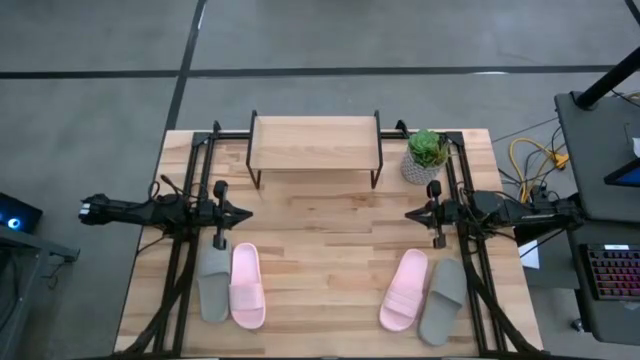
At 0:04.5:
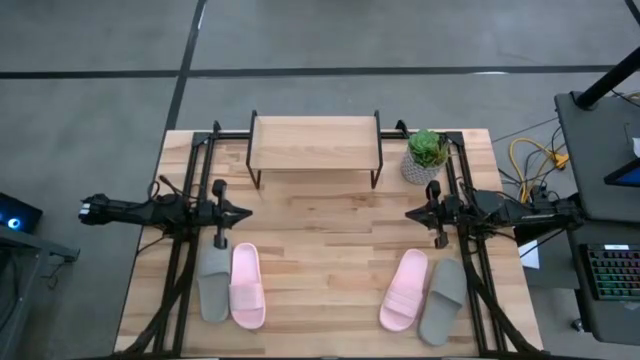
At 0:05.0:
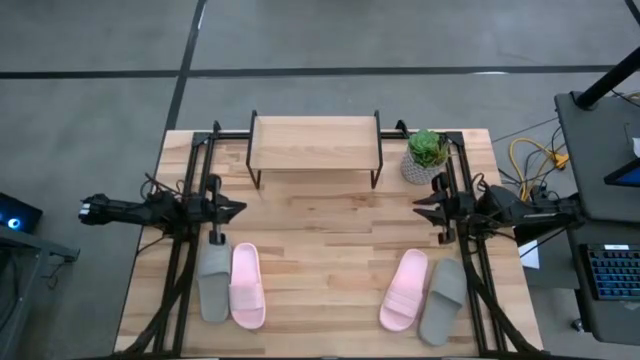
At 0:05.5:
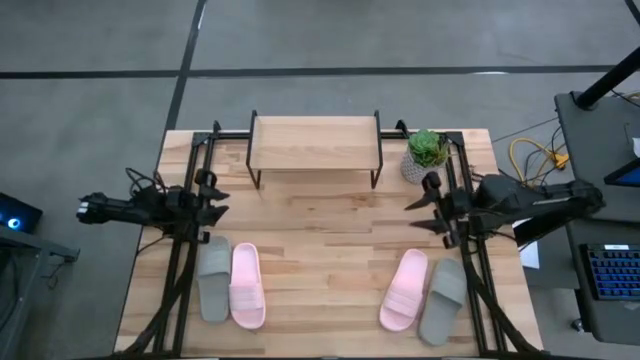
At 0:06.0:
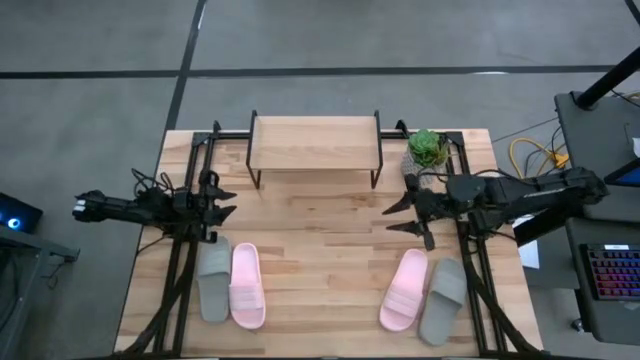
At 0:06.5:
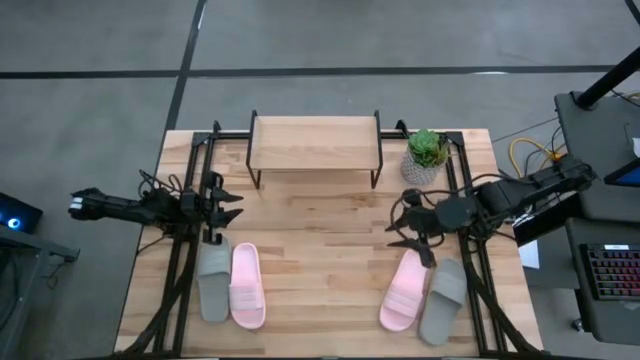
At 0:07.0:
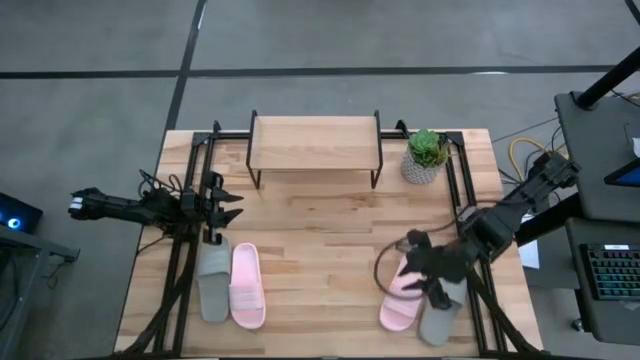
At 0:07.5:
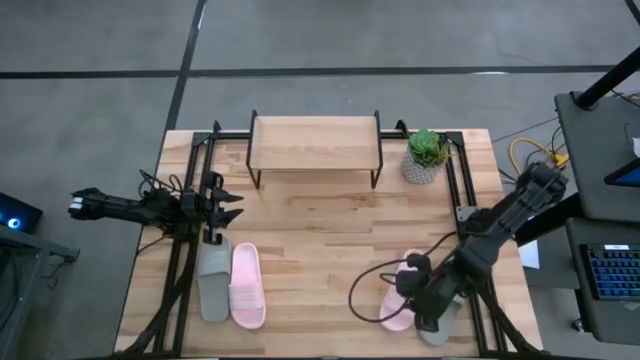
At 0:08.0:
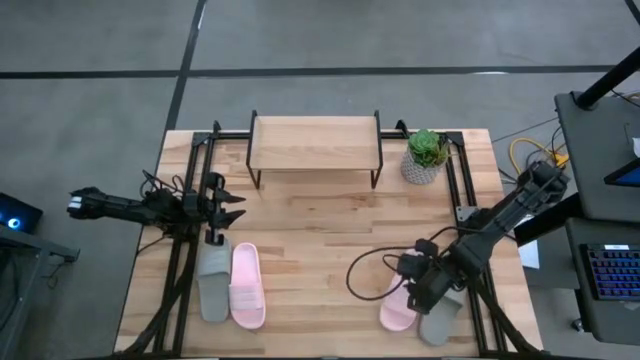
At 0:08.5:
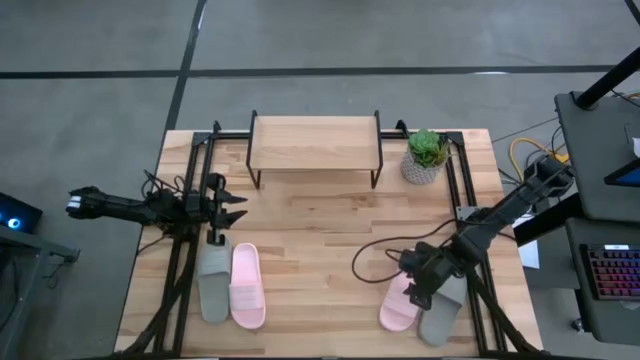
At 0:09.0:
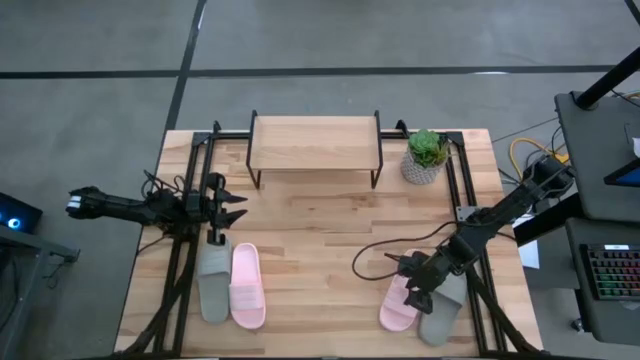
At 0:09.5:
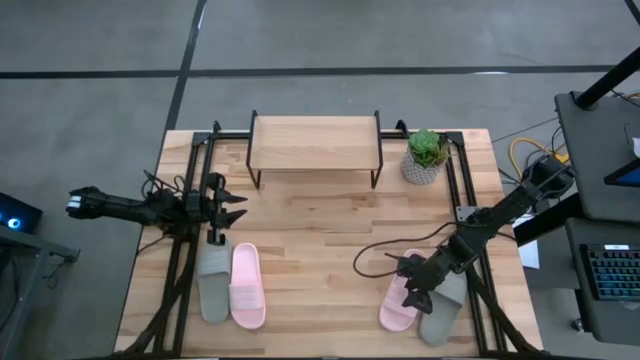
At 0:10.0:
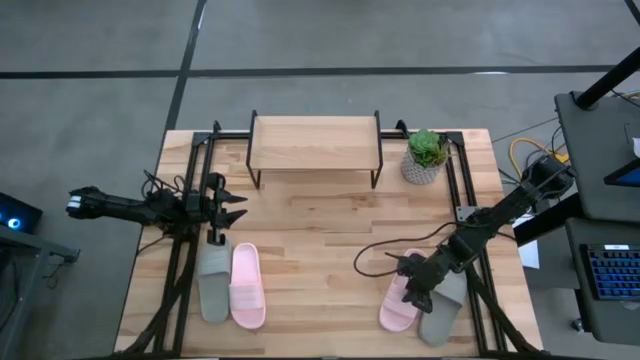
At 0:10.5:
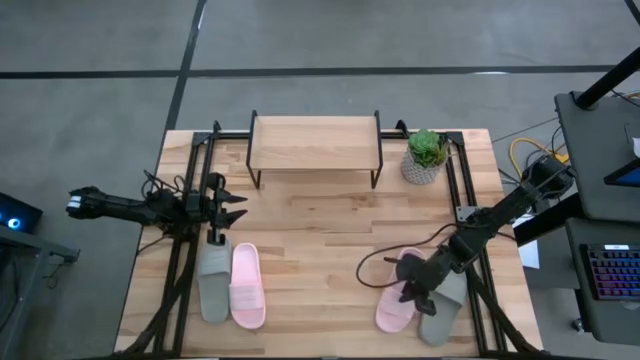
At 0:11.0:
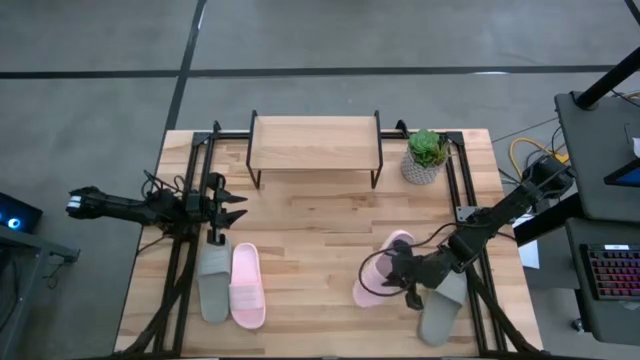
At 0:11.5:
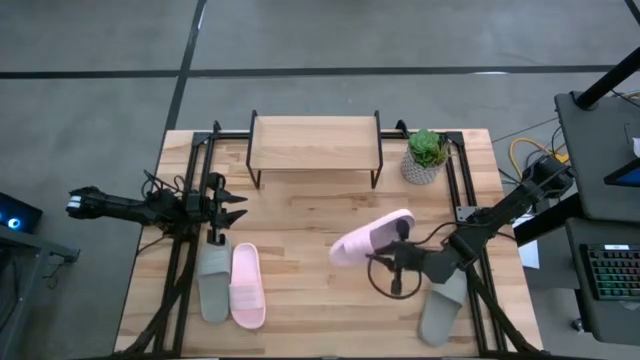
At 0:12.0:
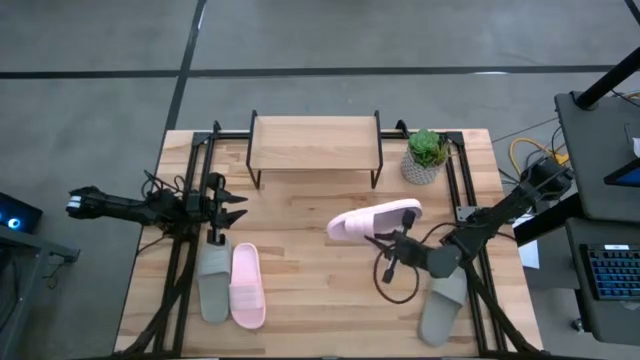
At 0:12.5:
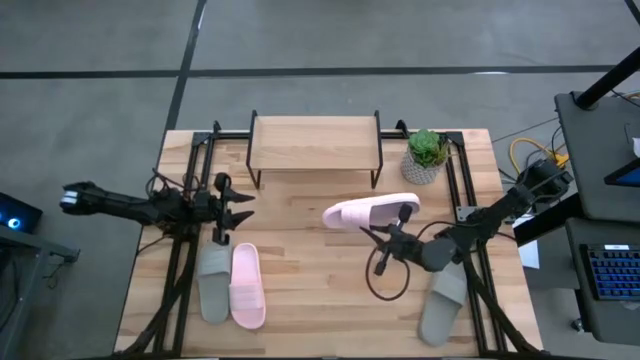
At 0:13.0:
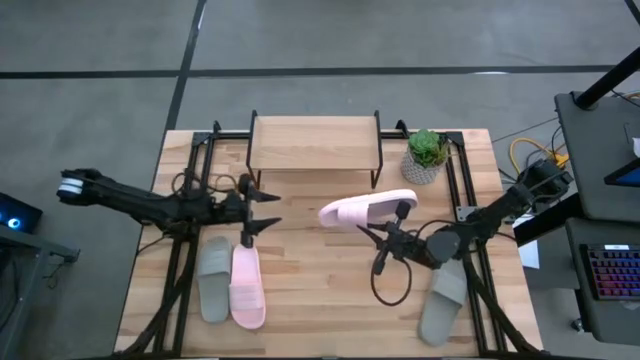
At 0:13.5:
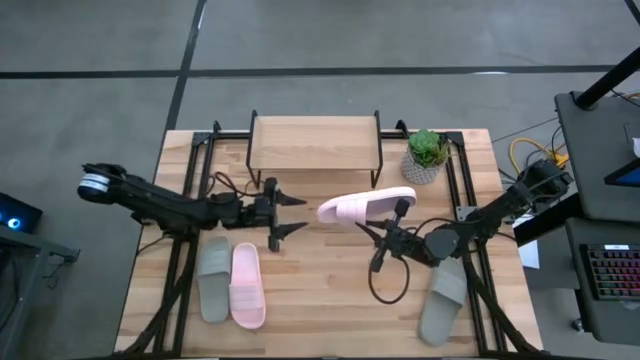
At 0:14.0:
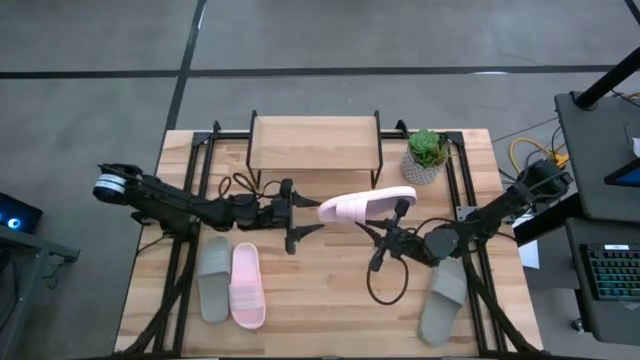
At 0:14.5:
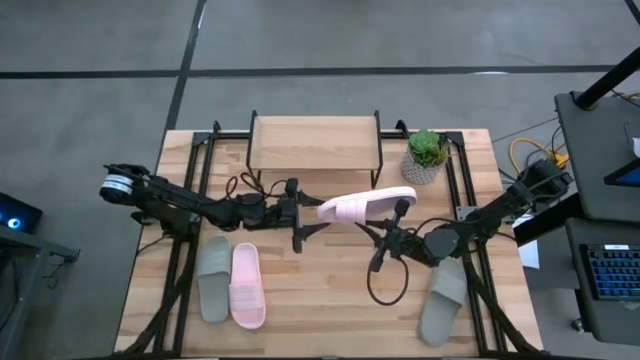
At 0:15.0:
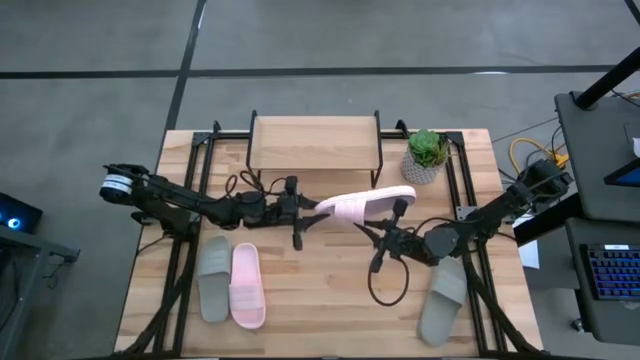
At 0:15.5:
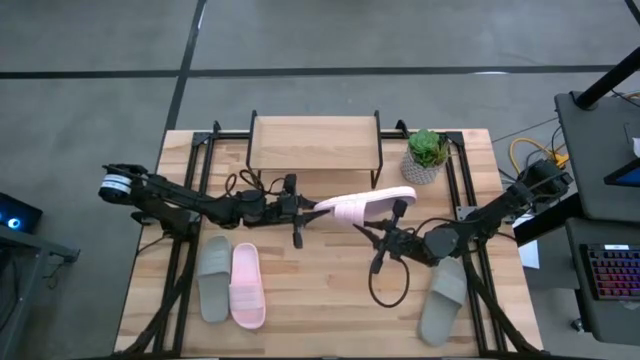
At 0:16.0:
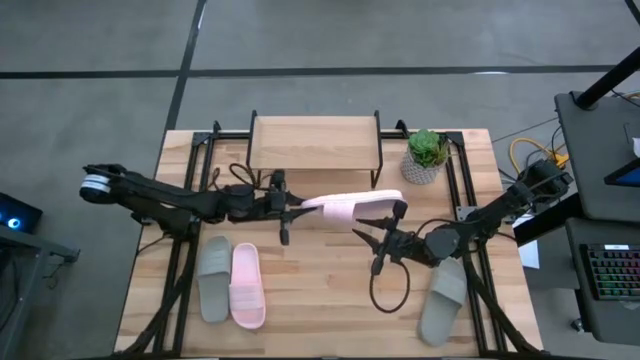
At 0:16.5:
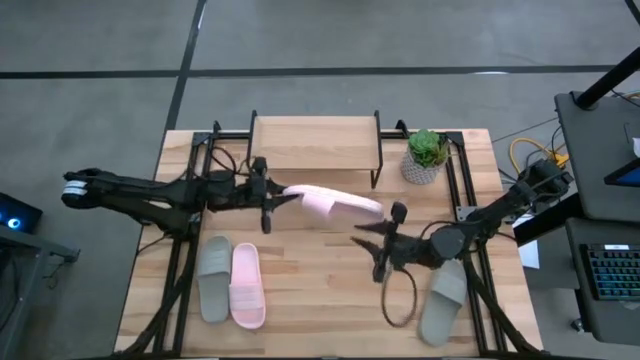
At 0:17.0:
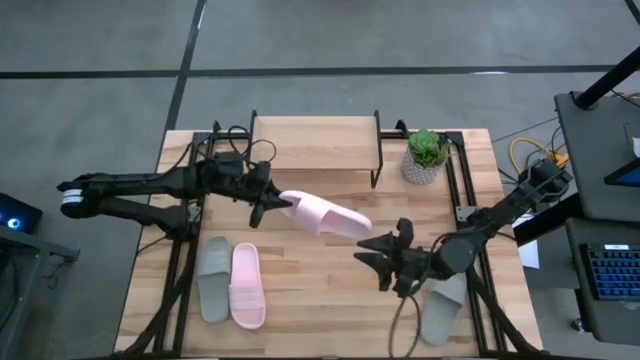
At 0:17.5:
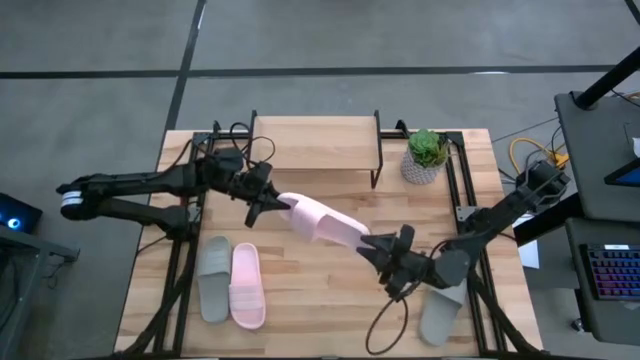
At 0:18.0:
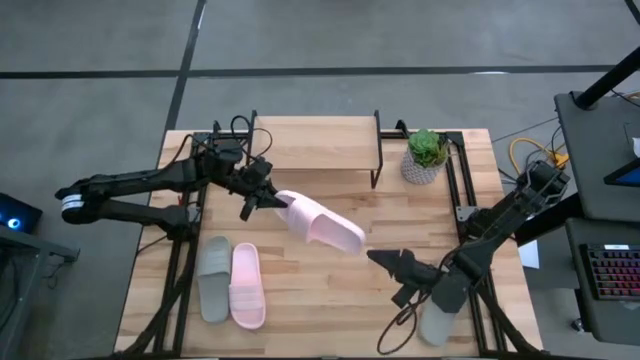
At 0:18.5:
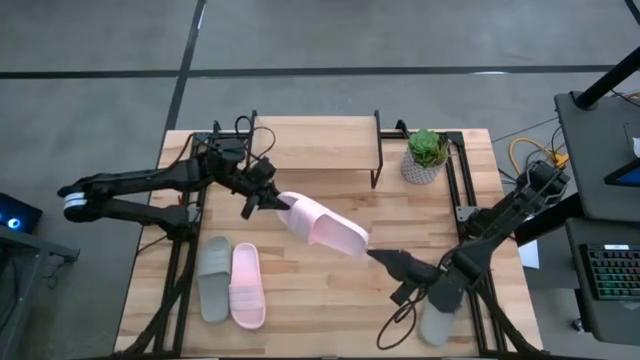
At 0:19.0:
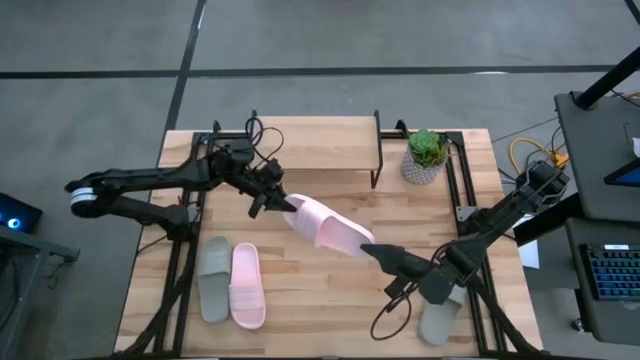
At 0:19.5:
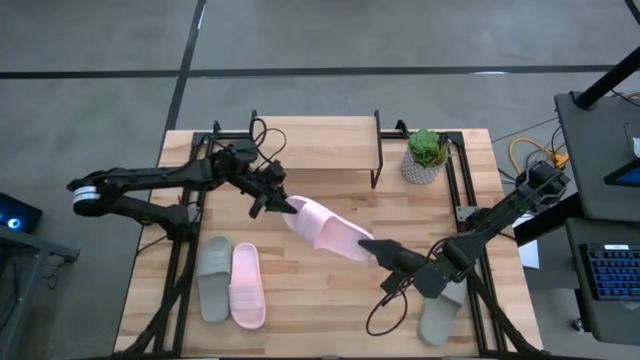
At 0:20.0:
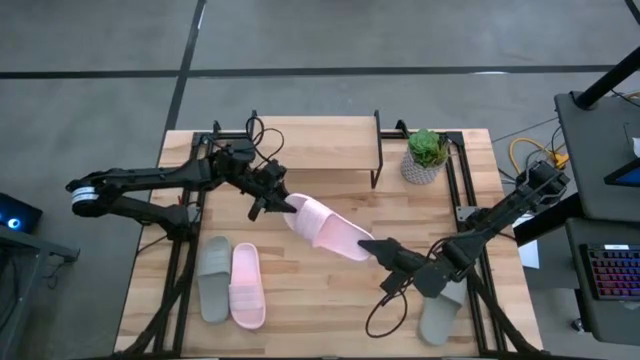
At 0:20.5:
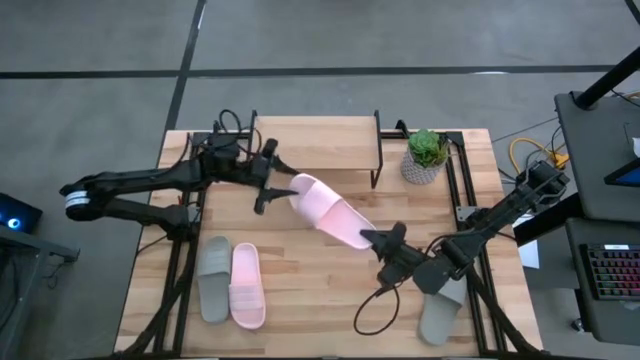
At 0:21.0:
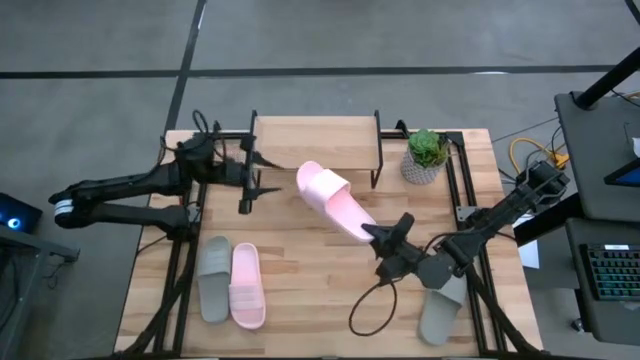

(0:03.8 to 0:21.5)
Task: Pick and place slides into the shelf
Put the right pink slipper on the shelf

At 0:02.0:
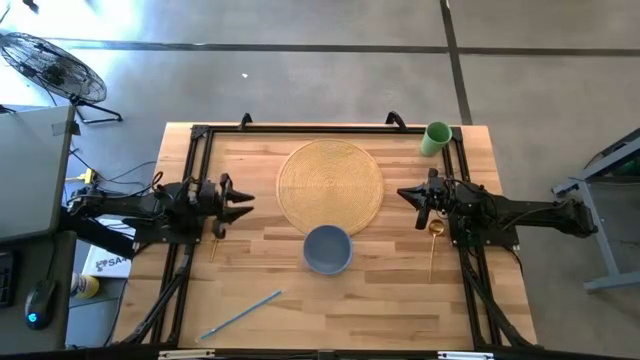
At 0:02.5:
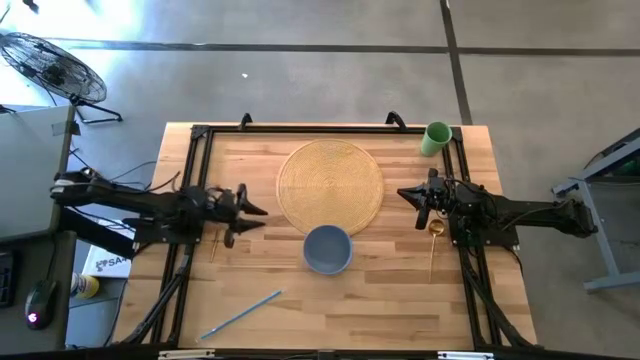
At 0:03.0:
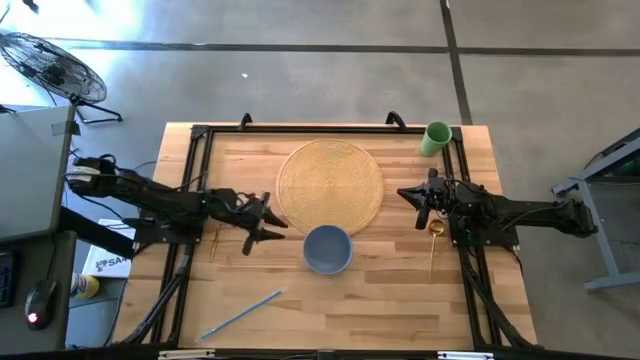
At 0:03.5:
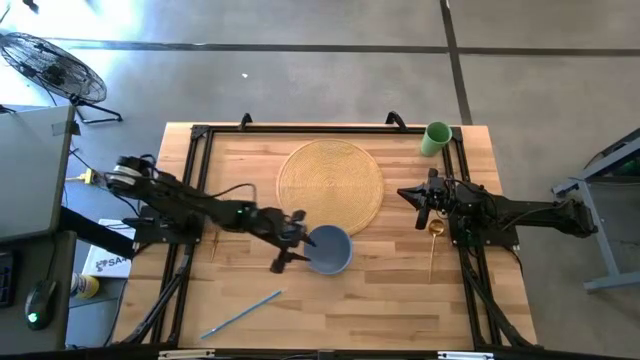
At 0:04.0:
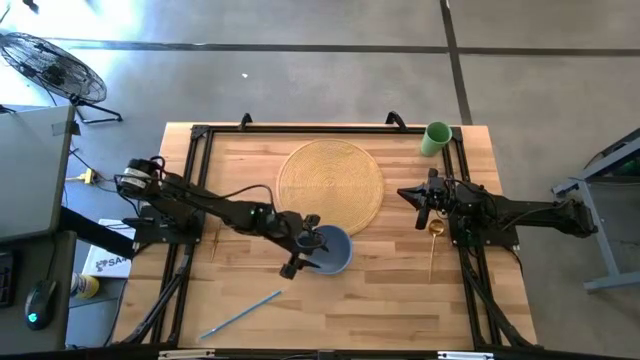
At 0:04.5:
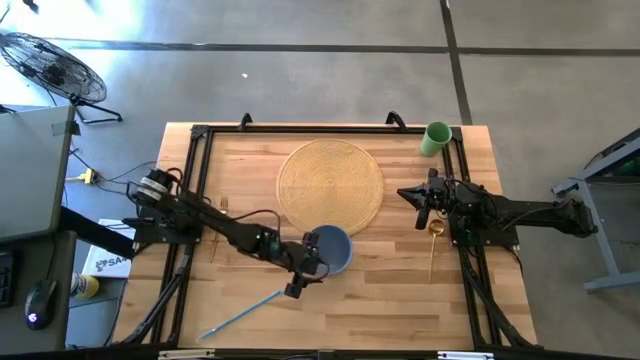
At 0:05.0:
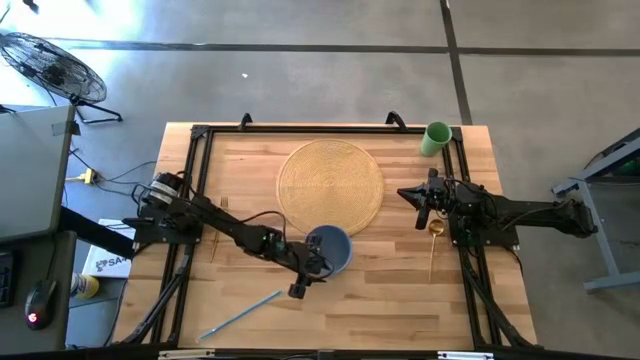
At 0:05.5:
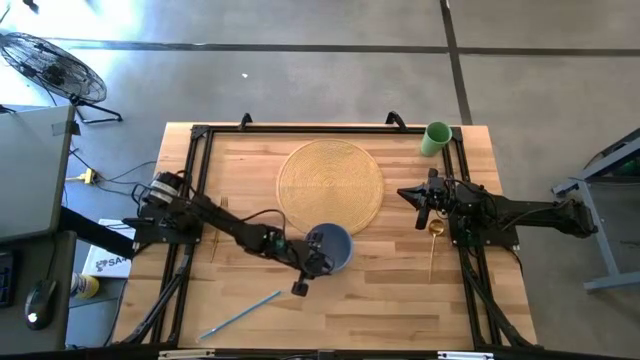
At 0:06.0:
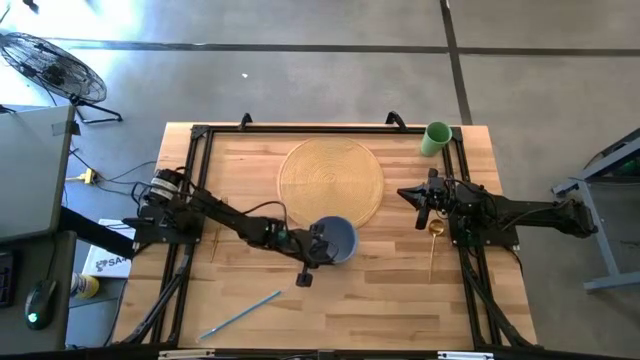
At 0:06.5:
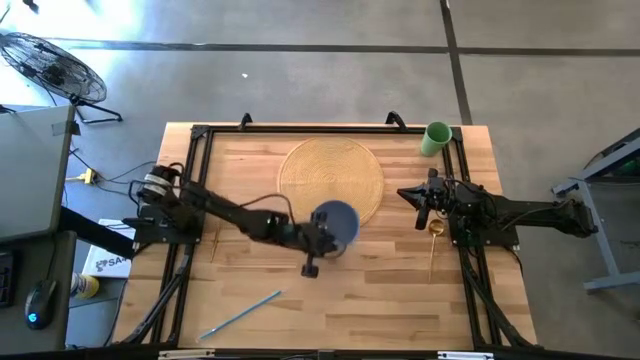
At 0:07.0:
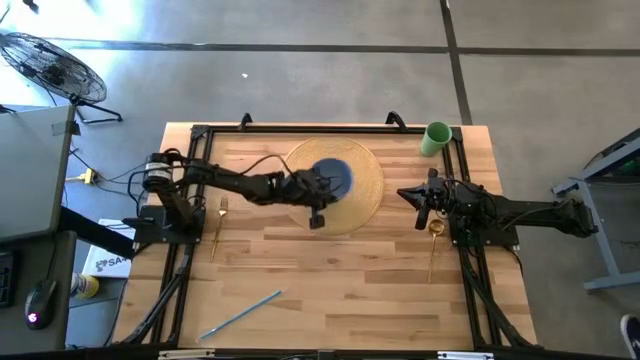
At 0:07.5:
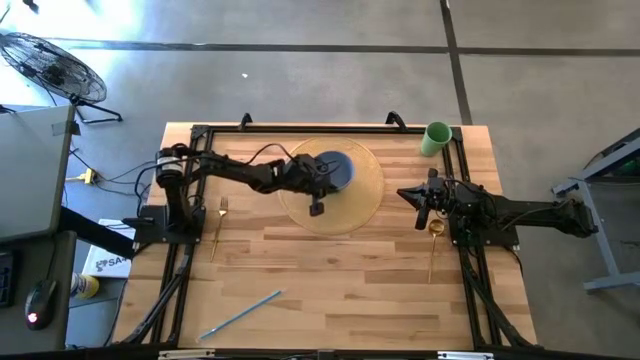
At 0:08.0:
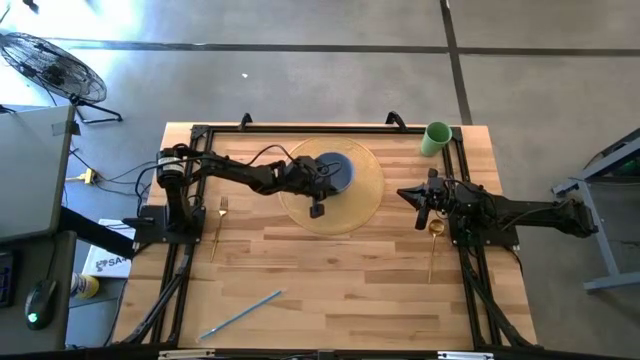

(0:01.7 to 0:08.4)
Task: Pick & Place Utensil
Put the blue bowl on the brown placemat
